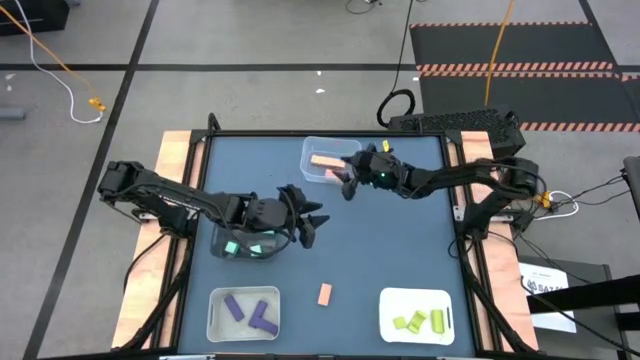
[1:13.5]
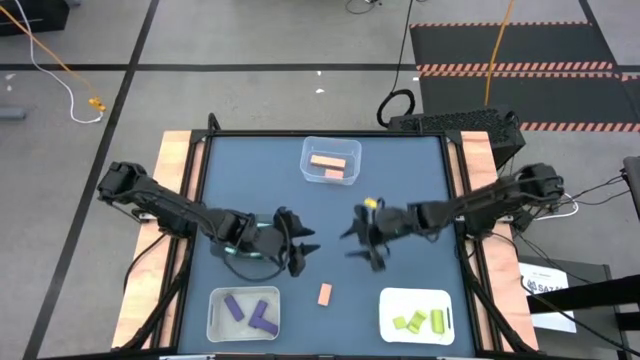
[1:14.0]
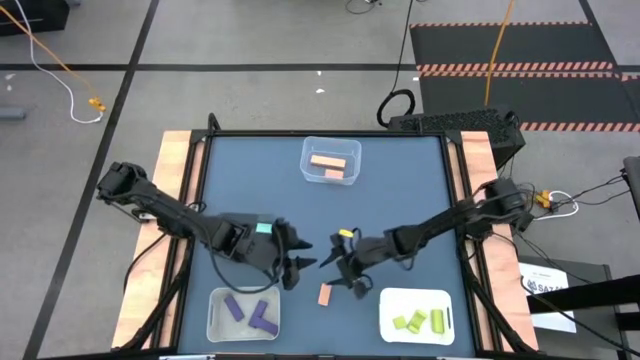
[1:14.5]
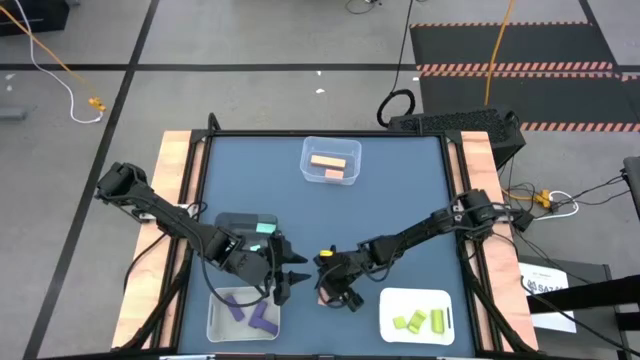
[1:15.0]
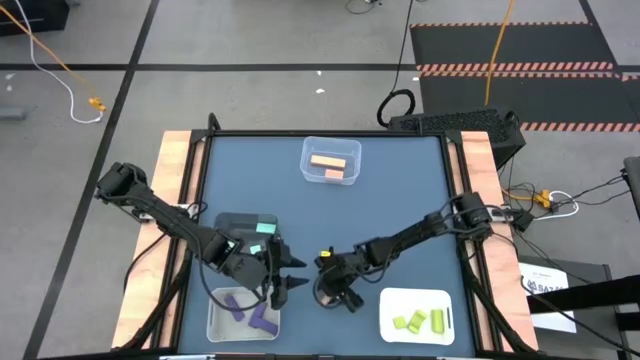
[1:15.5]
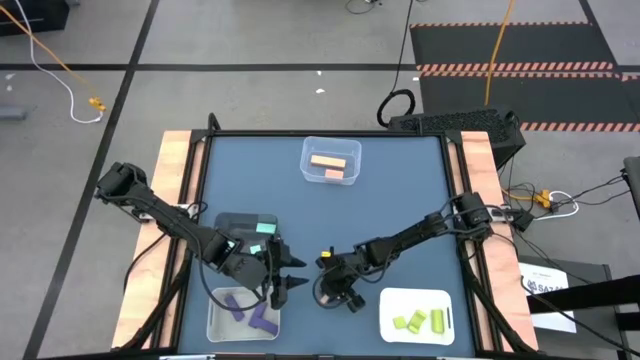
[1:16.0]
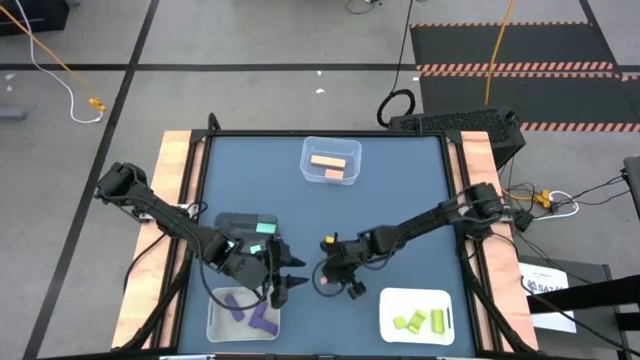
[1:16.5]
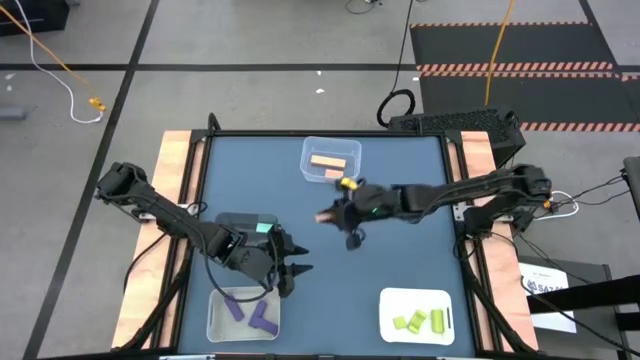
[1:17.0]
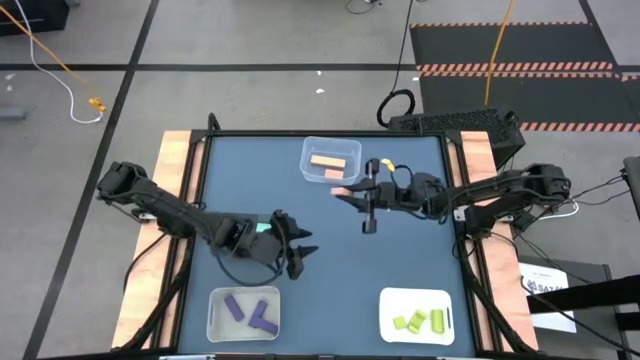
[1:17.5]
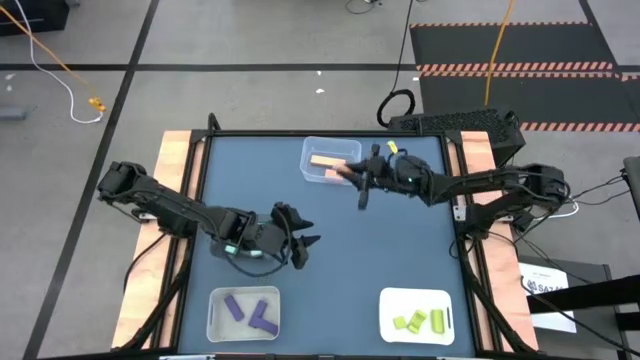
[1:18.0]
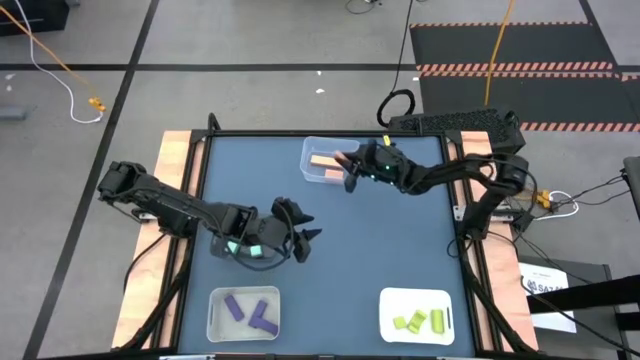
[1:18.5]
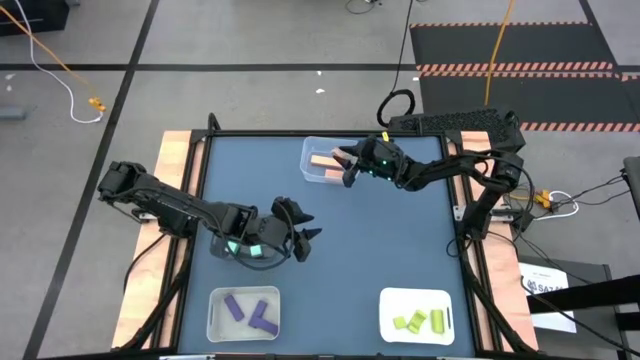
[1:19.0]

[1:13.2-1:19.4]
Task: Sort & place blocks by color
Put the orange blocks into the transparent bin

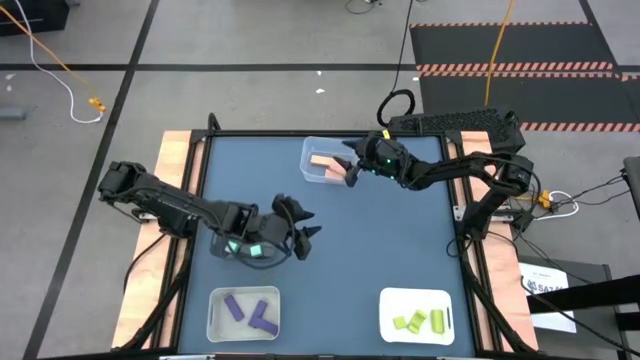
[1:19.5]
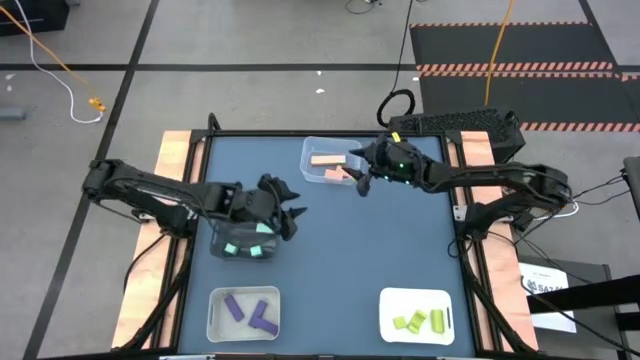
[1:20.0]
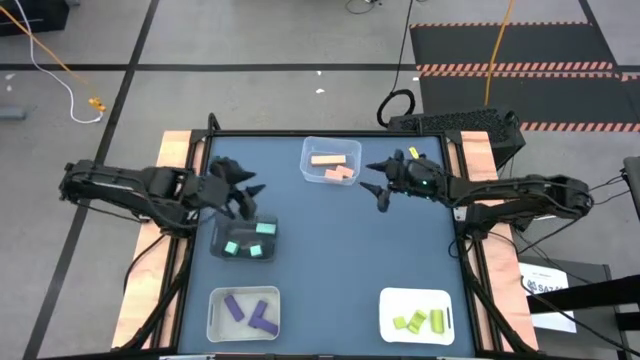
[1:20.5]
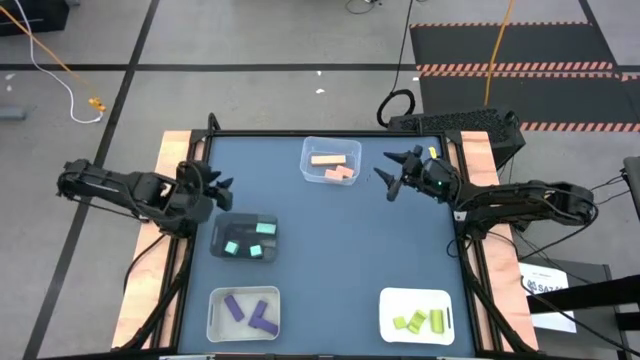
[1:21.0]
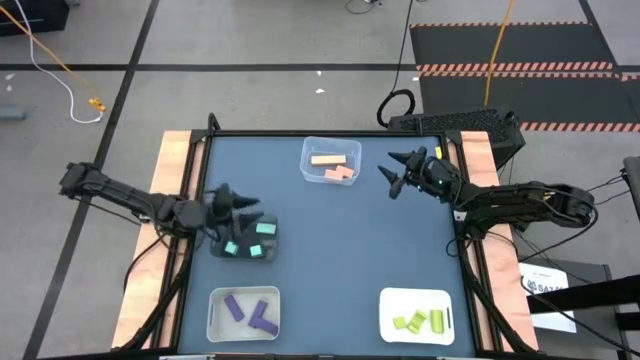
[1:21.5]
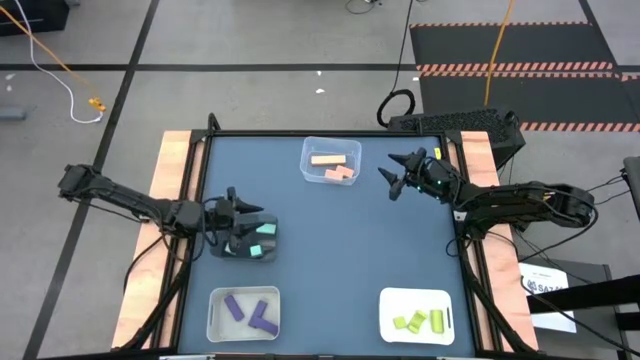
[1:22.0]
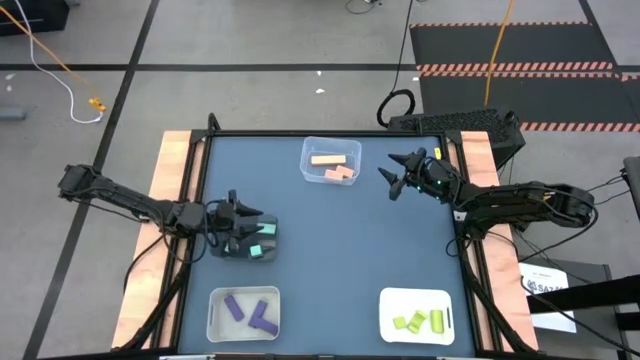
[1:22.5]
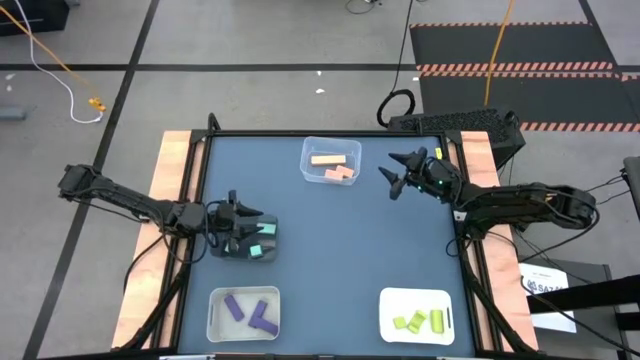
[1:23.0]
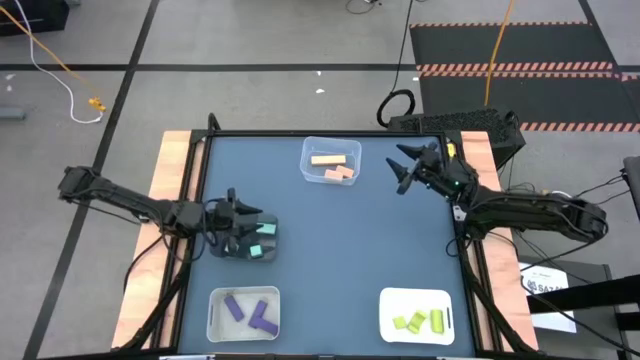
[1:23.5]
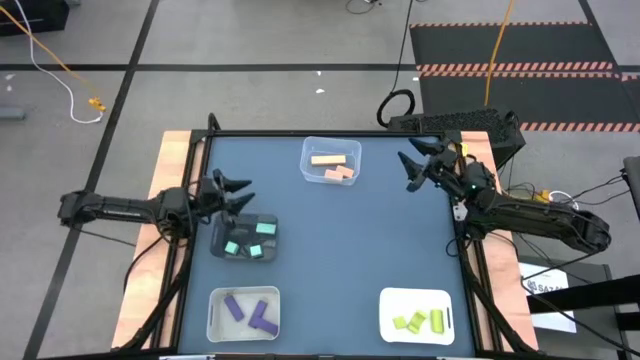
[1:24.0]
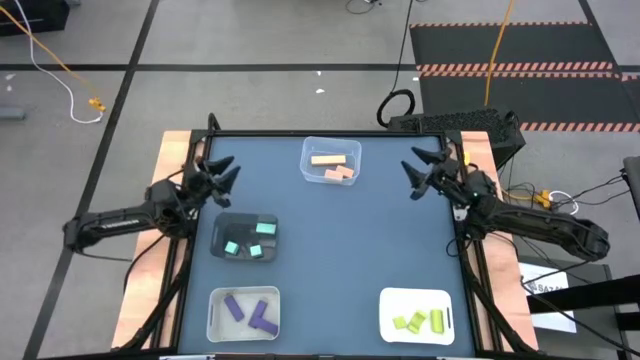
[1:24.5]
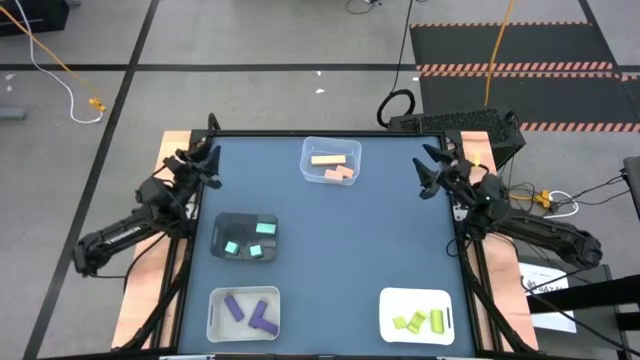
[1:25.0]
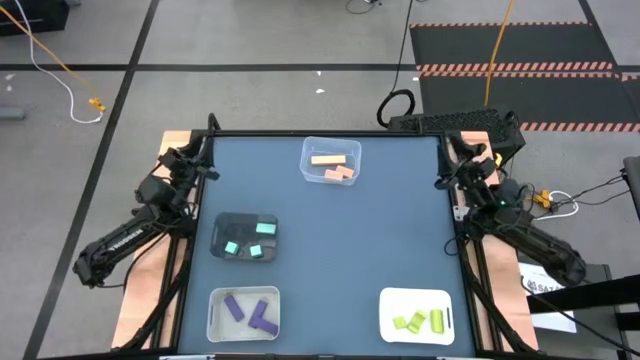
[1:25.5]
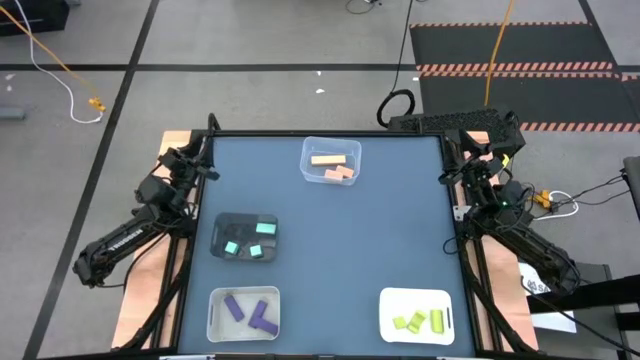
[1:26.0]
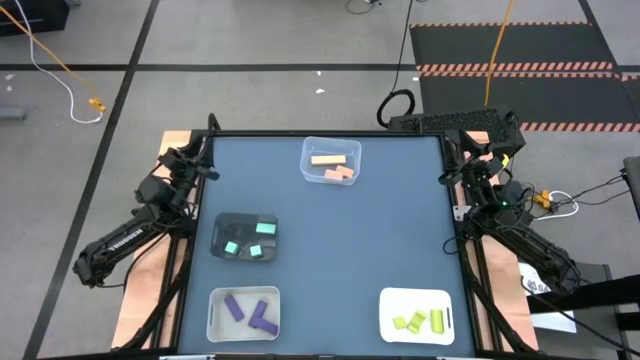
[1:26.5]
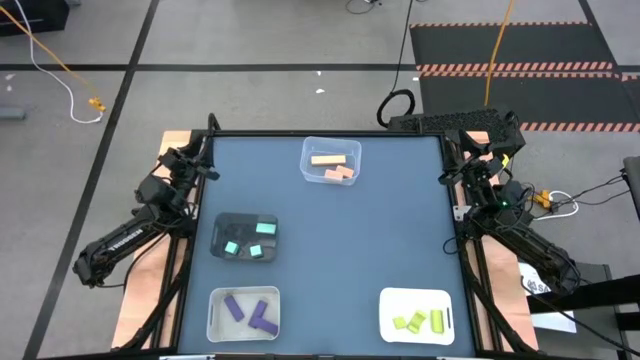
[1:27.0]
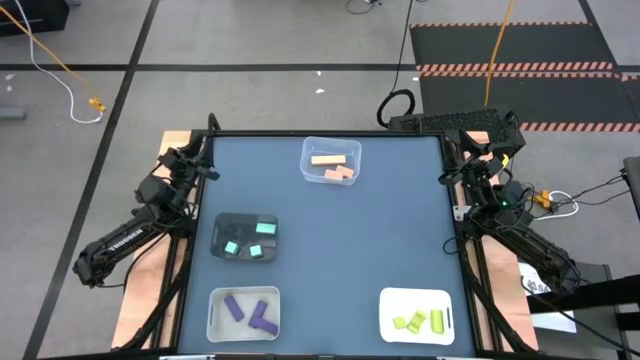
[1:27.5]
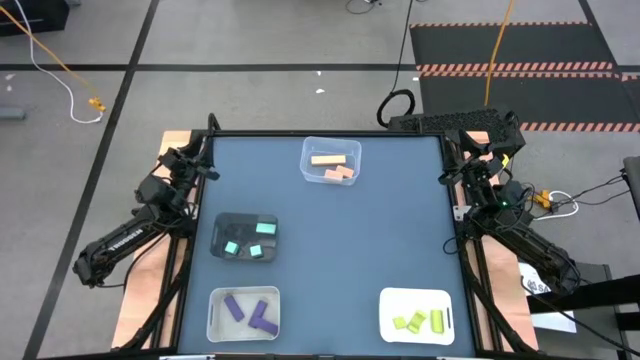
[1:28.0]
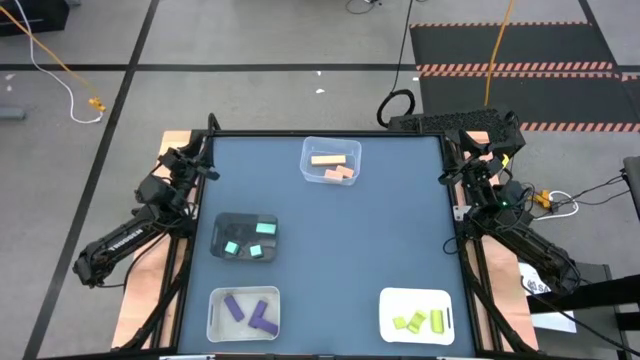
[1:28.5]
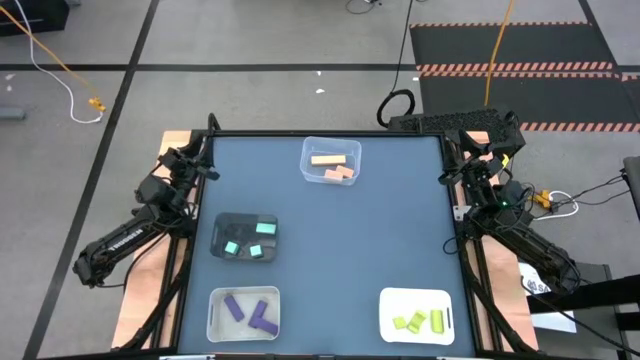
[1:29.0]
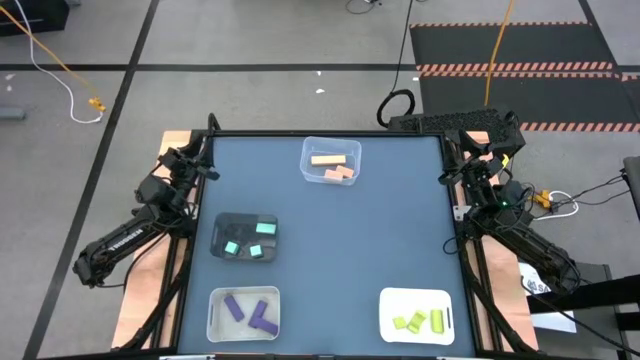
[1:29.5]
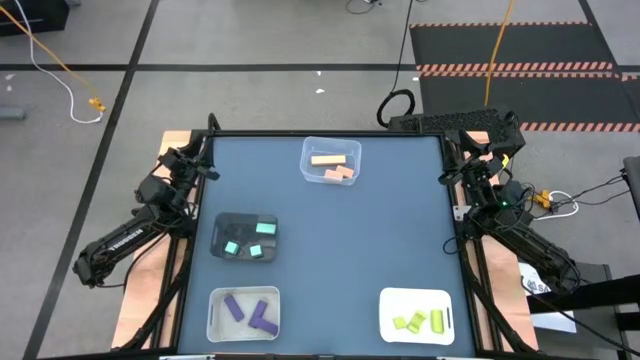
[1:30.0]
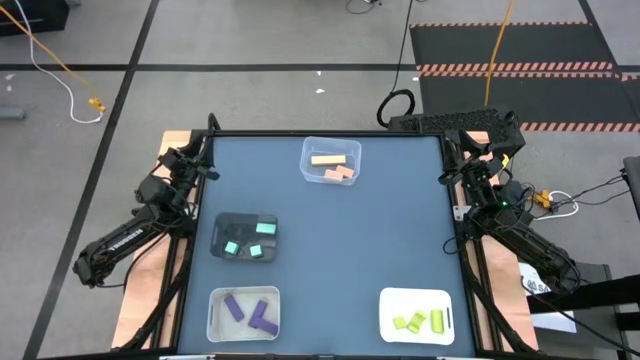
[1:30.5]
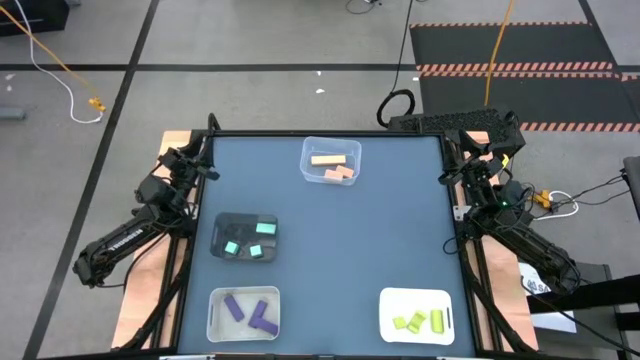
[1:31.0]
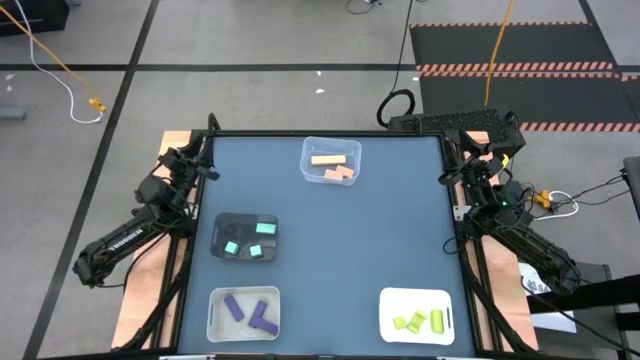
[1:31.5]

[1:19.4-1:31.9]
Return to Home Position

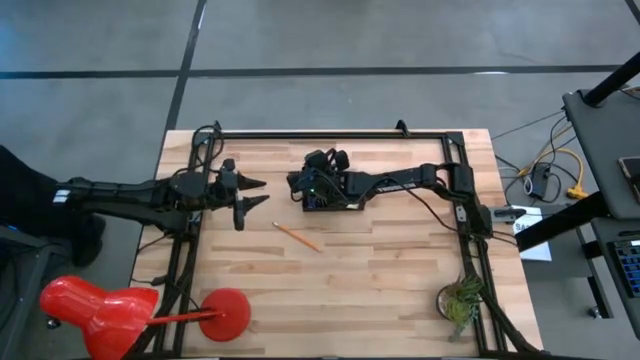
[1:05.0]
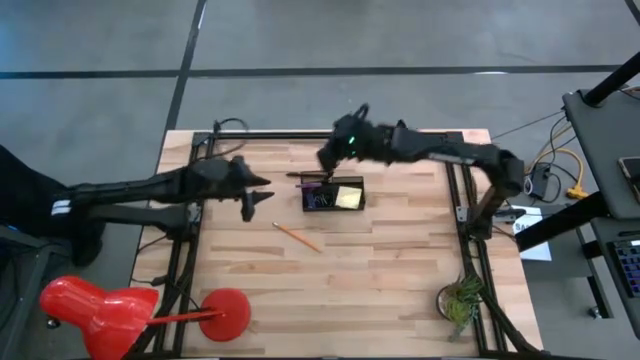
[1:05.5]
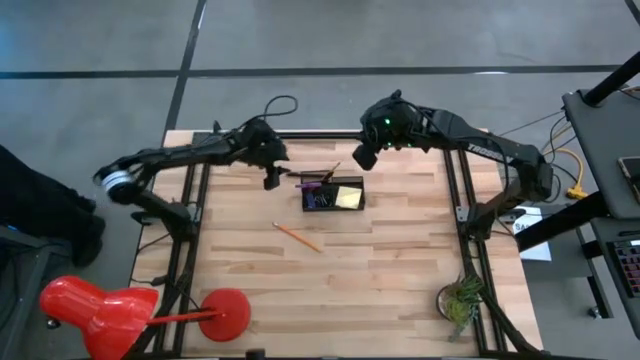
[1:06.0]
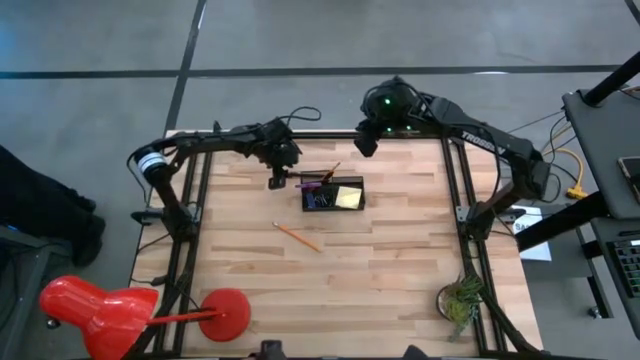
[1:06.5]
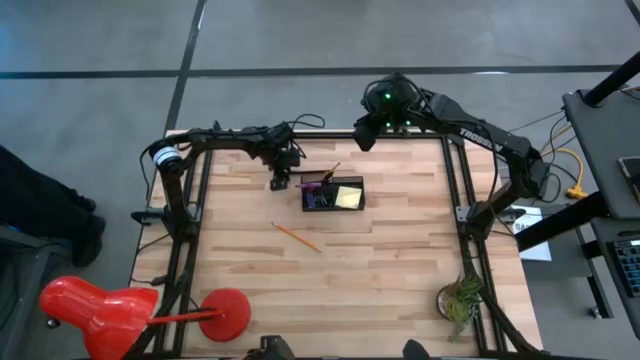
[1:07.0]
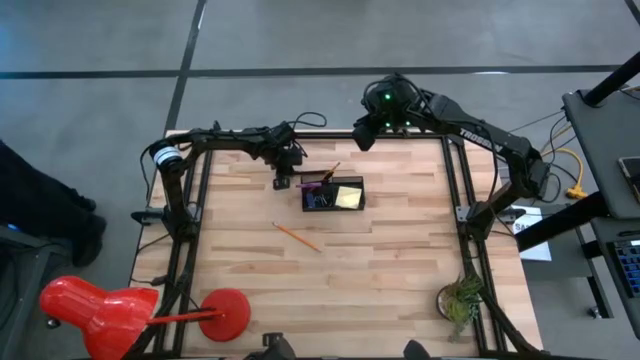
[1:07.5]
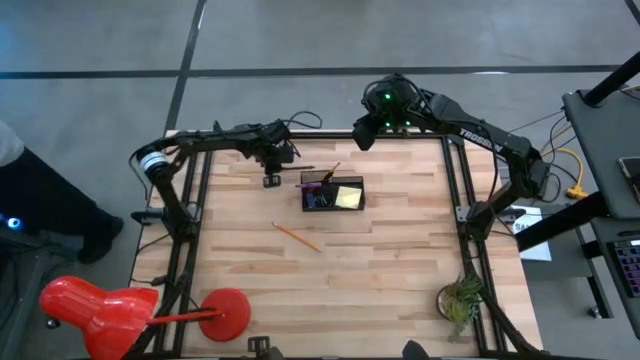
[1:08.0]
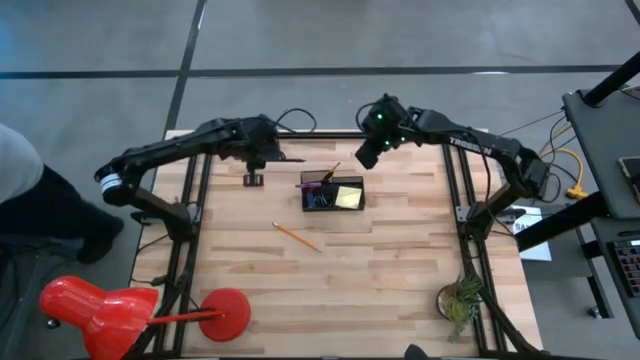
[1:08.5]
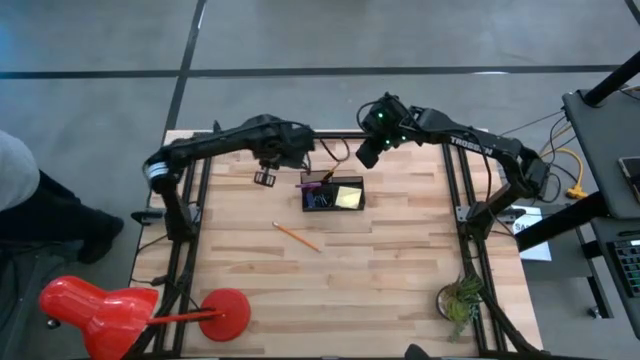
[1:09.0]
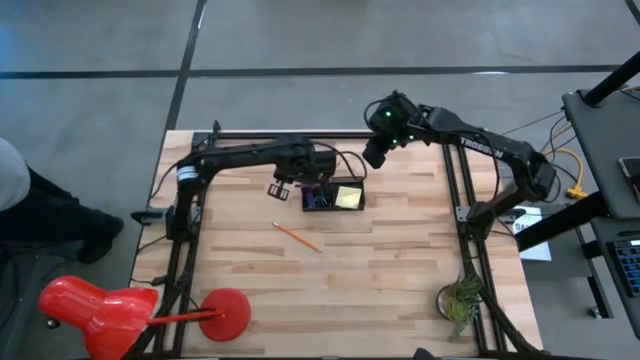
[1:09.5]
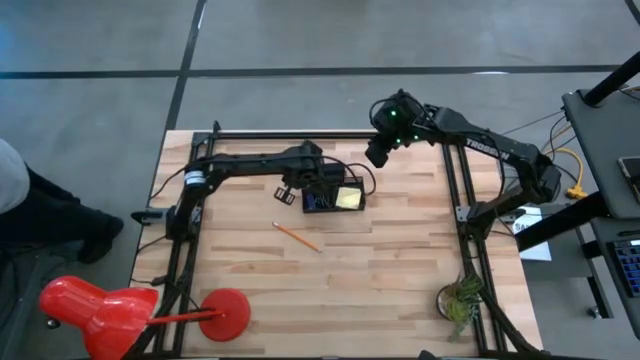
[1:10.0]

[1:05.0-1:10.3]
Task: Pick and place office supplies into organizer
Put the black pen into the black desk organizer
